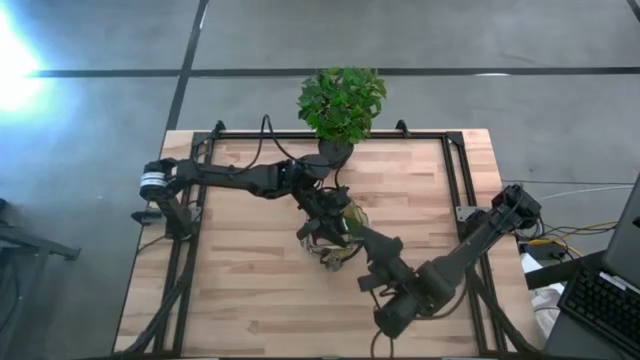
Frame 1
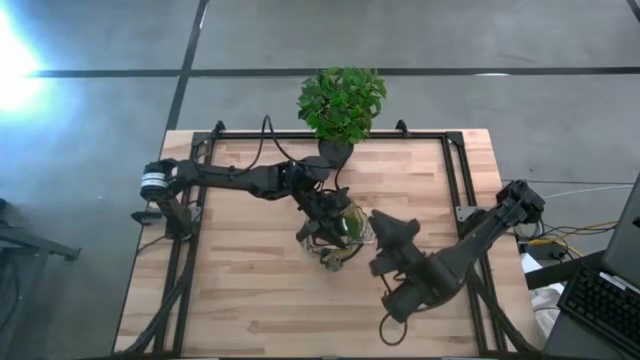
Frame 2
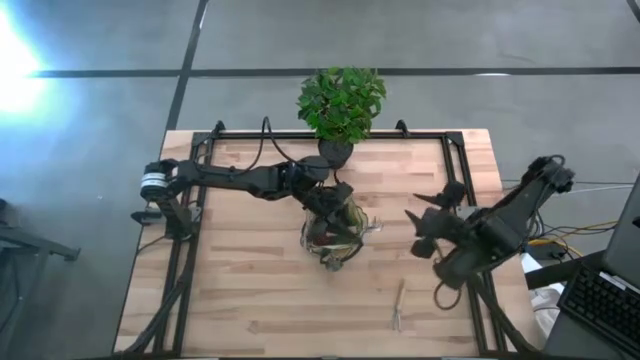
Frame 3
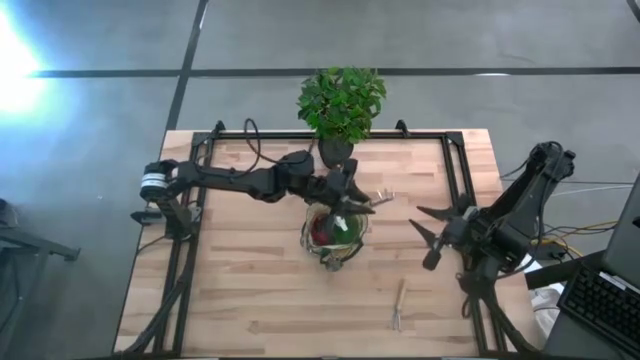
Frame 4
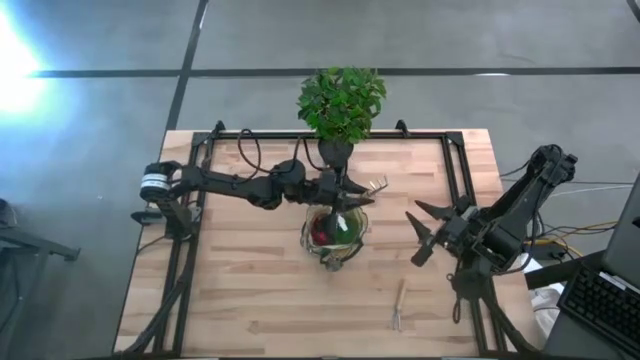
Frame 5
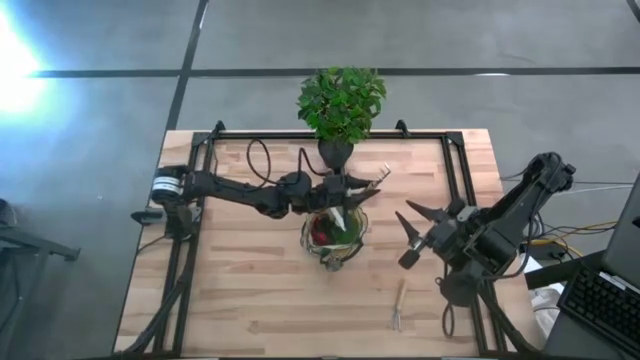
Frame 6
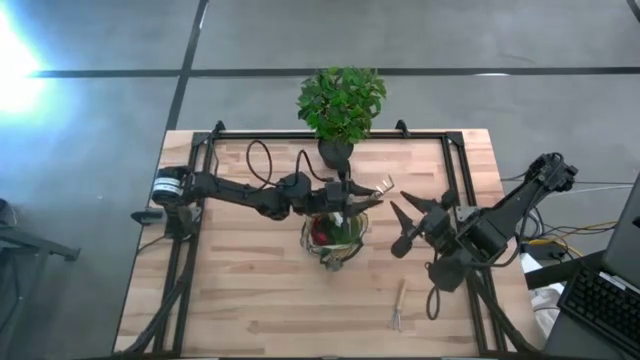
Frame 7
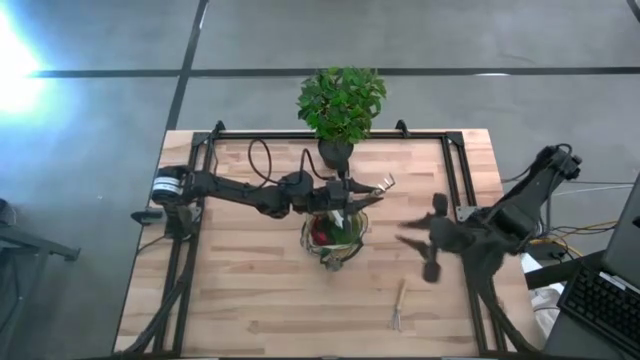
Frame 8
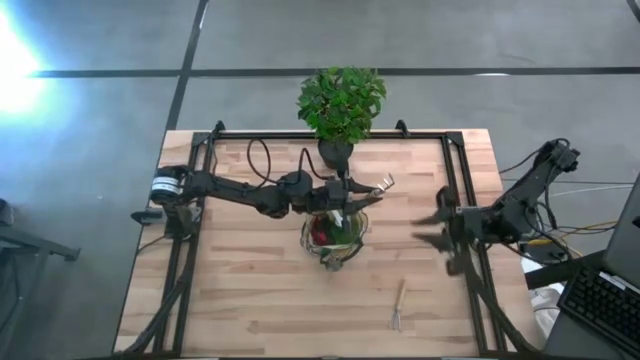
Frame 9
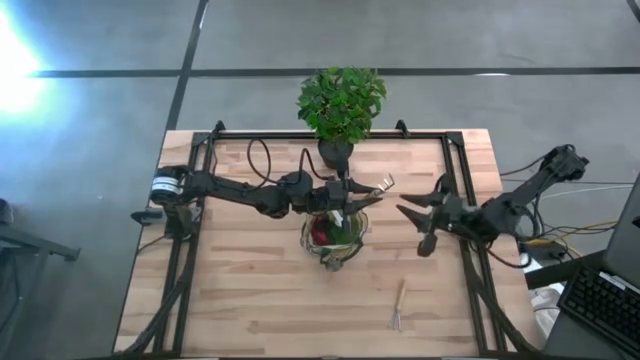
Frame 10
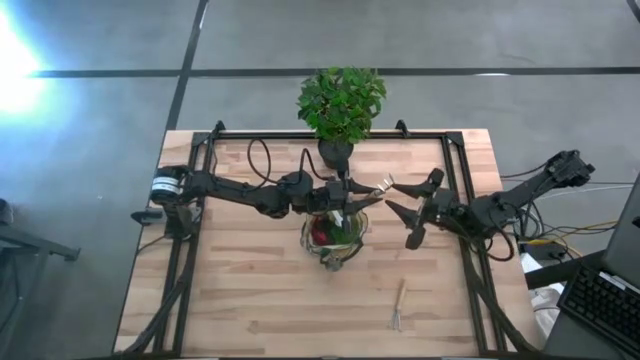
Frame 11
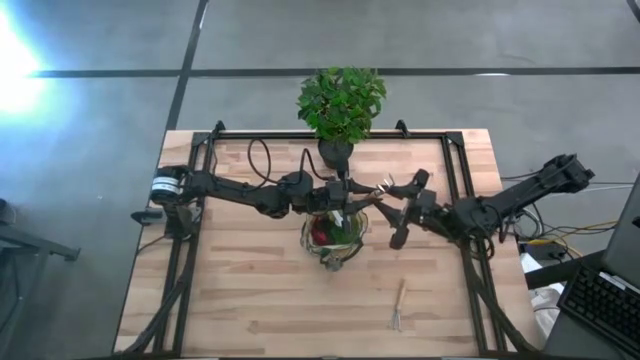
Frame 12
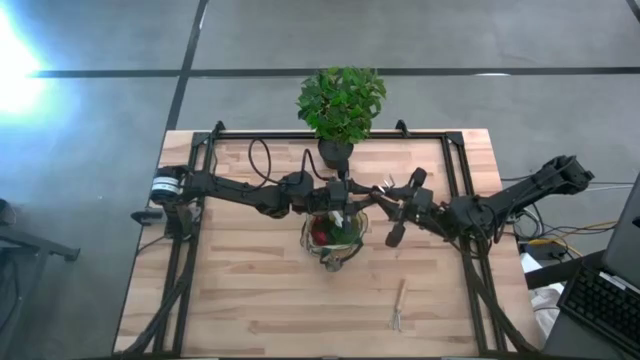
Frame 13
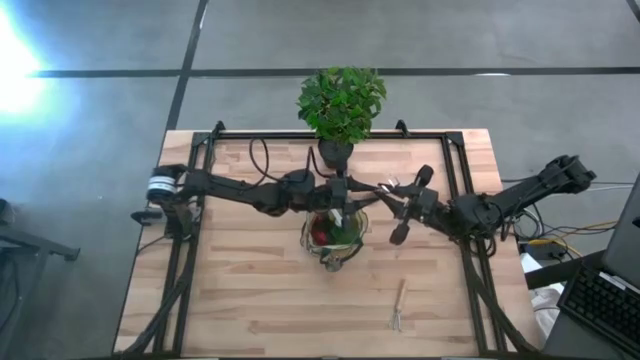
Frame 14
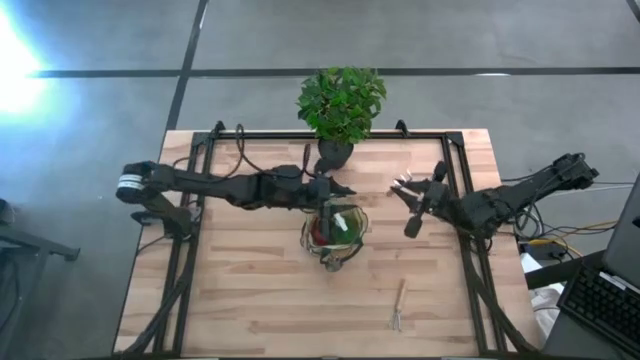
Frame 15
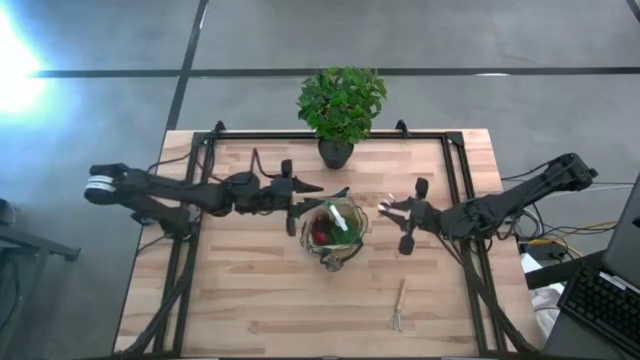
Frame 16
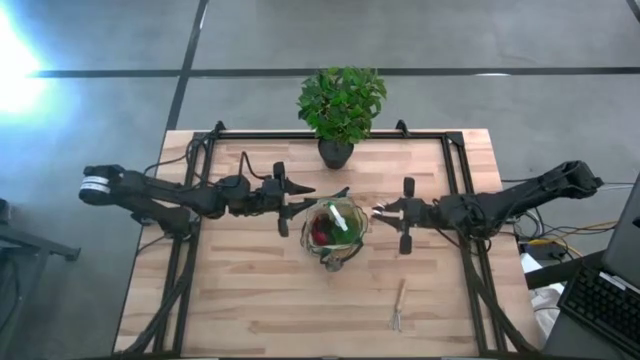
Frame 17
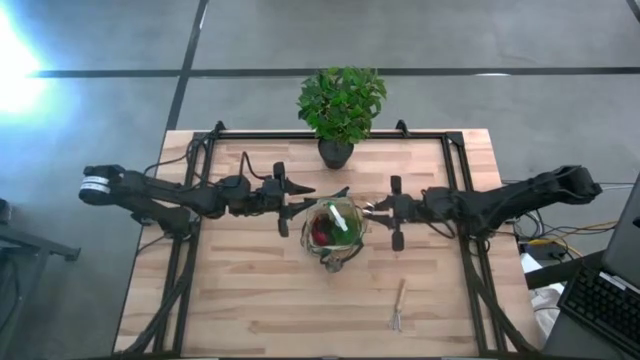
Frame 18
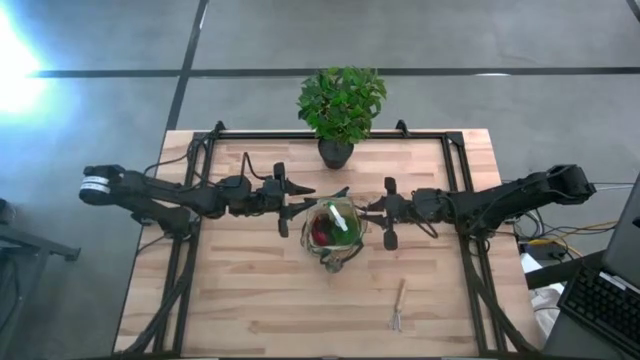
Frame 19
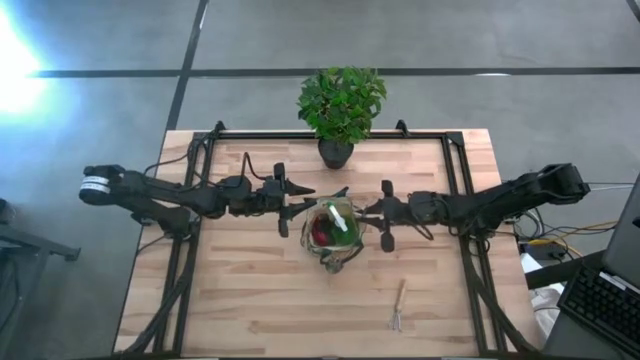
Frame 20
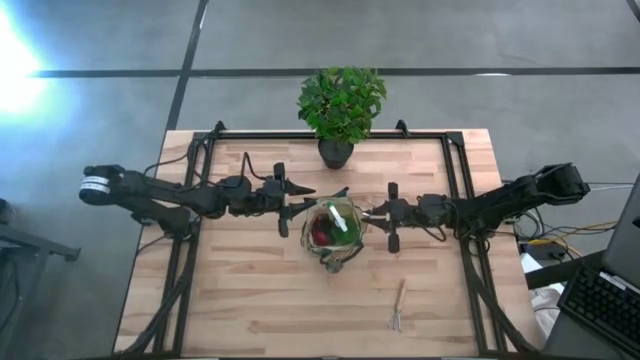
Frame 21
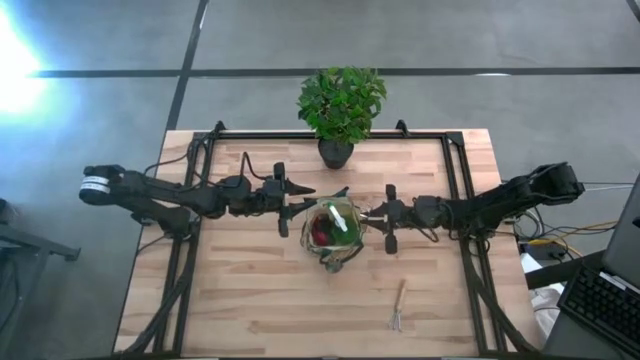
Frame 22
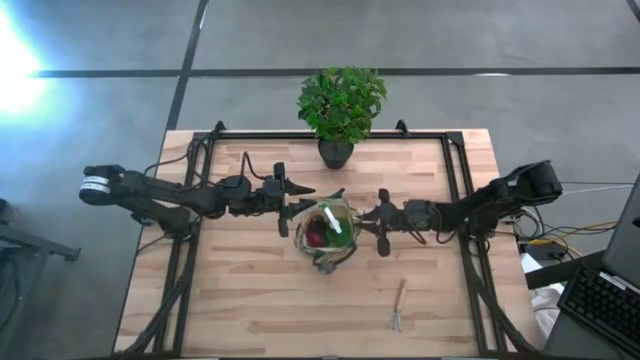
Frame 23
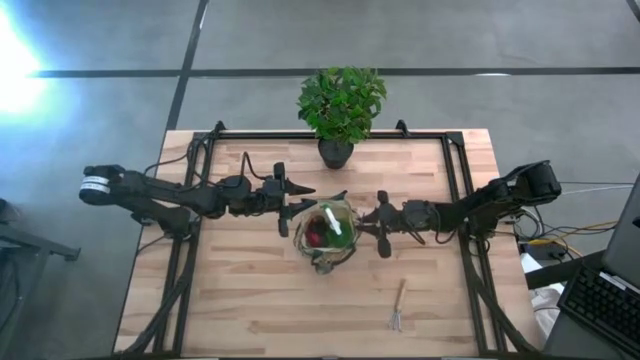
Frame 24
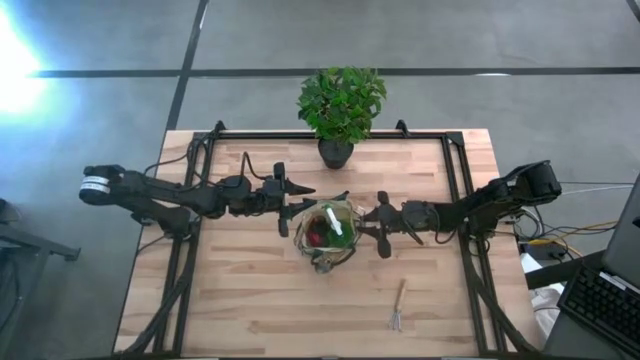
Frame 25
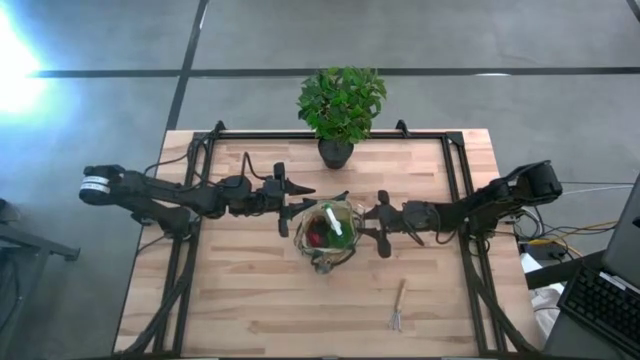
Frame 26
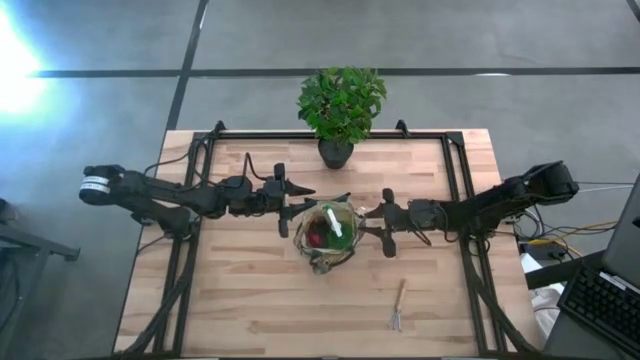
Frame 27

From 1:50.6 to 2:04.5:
Task: Pick & Place Garden tools in Gardening bag
Put the left brown hand rake into the side pocket of the gardening bag

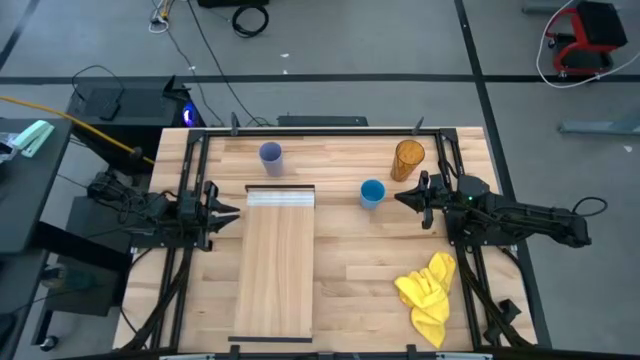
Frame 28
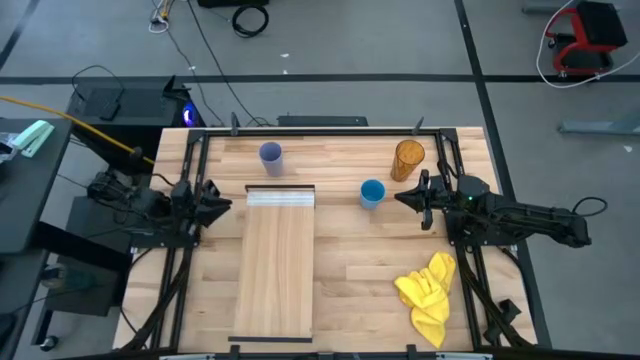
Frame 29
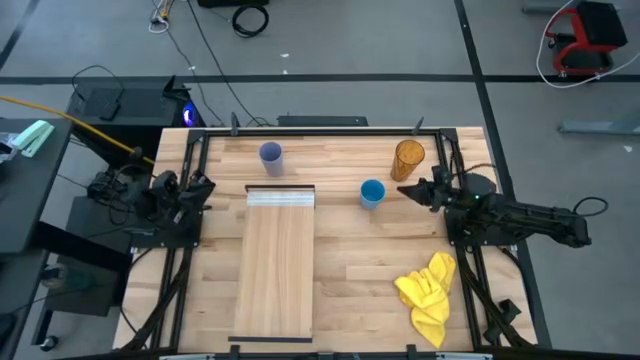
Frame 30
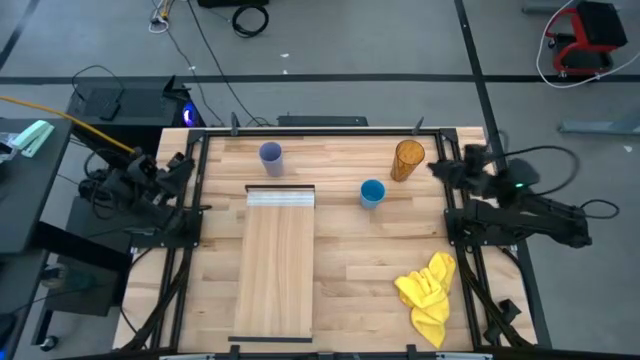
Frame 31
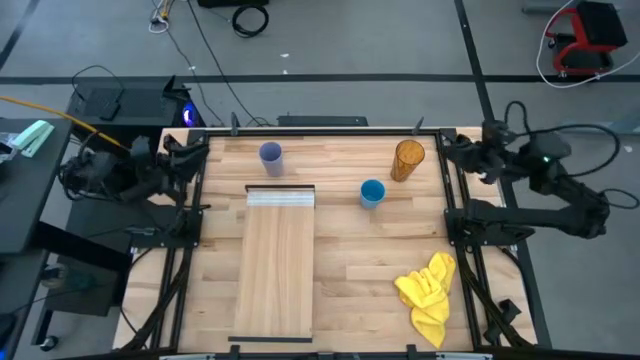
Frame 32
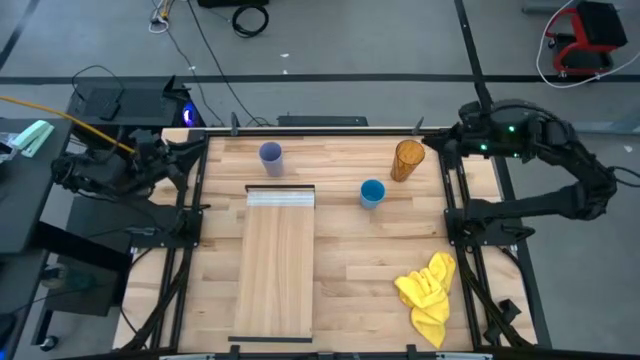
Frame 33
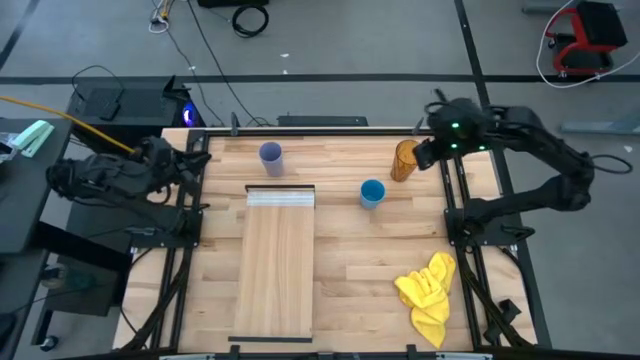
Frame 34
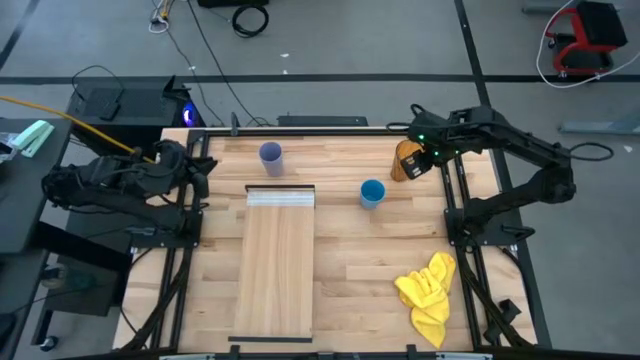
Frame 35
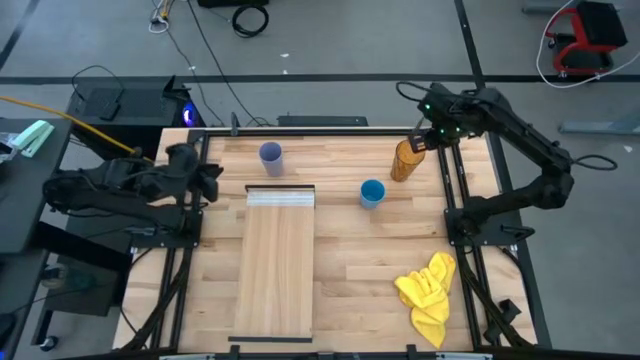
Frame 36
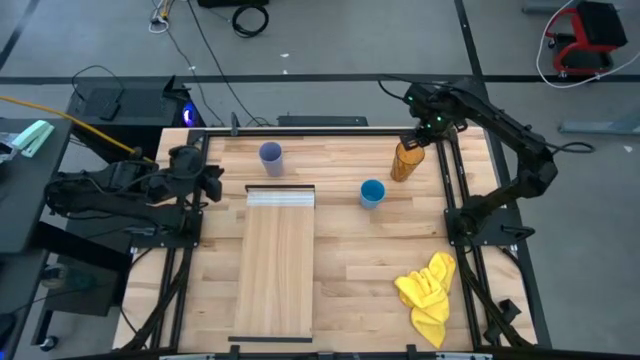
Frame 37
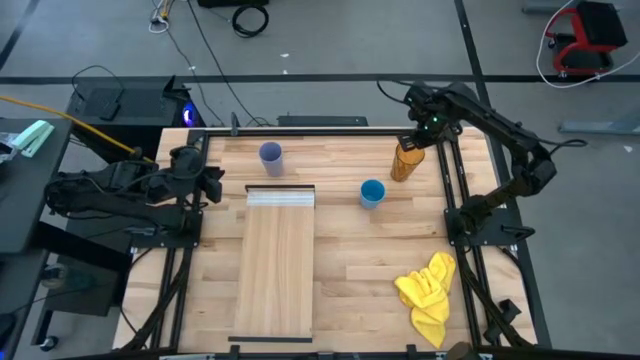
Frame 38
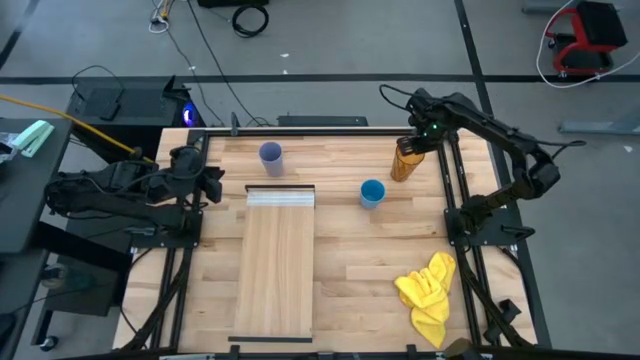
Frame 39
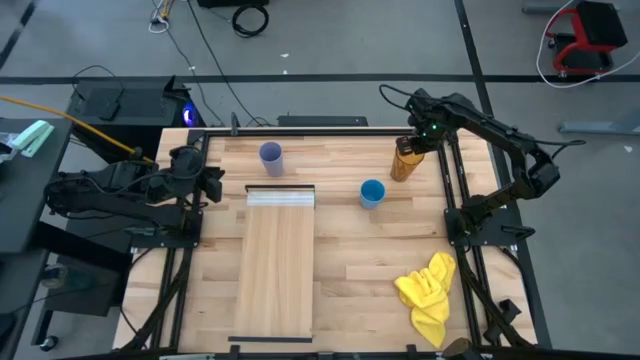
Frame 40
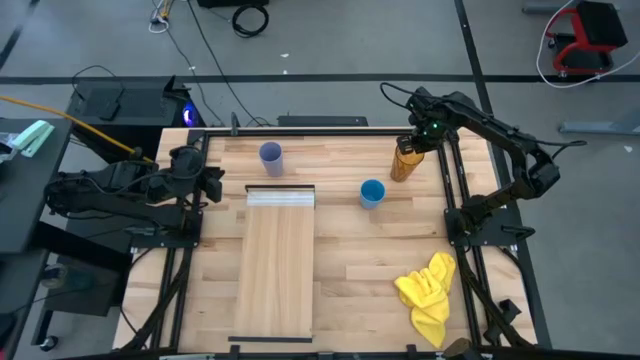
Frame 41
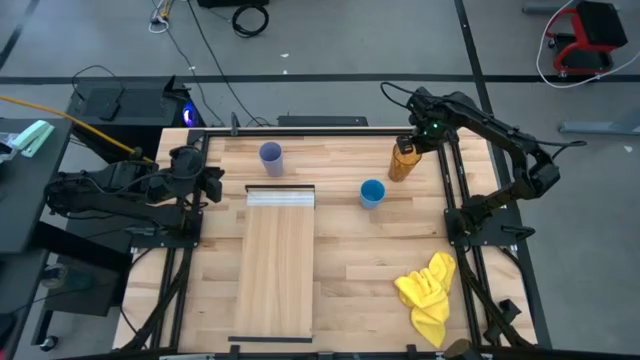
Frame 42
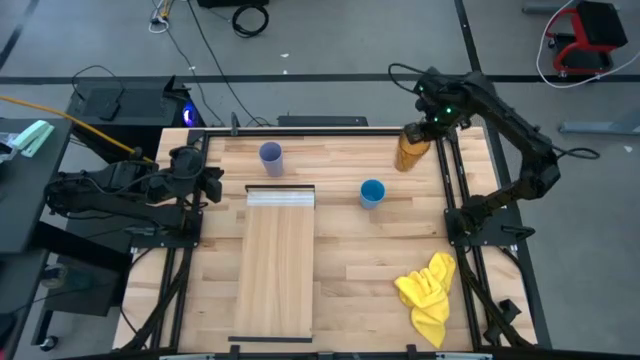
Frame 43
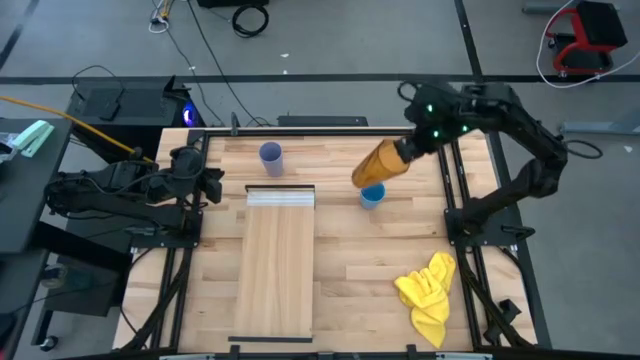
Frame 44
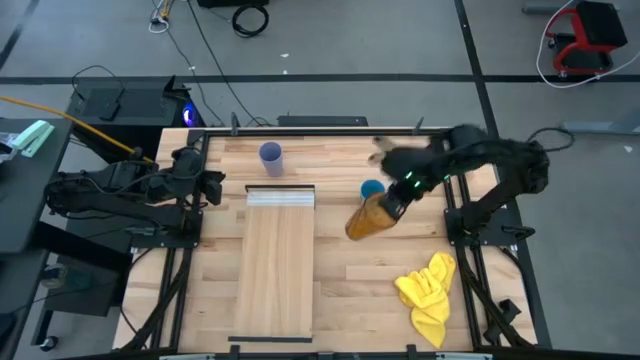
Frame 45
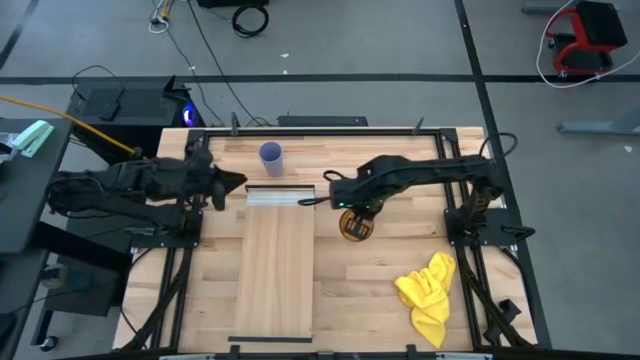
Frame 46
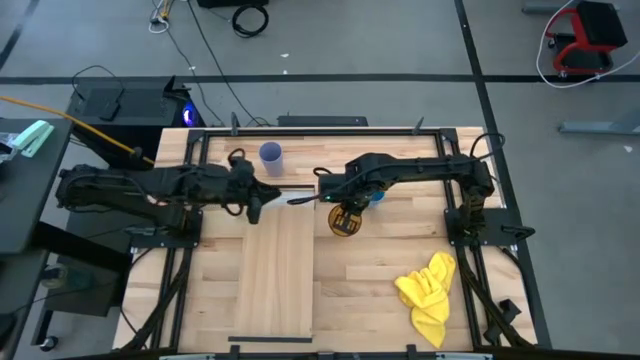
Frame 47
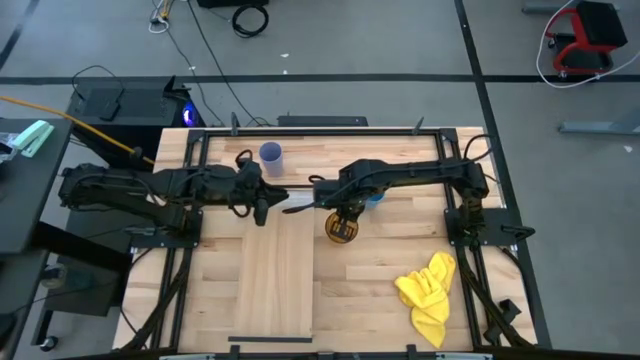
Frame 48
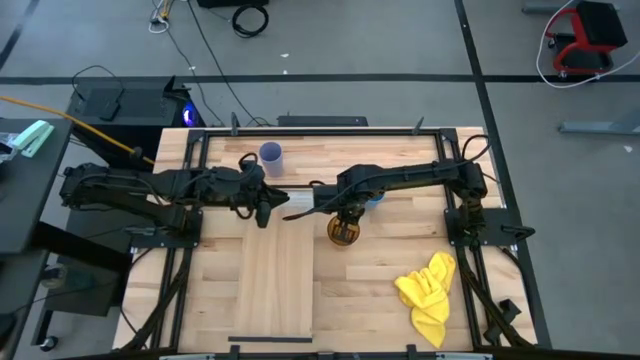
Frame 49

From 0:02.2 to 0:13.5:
Task: Stack small to large cups/mugs on shelf
Move the brown cup to the middle of the table
